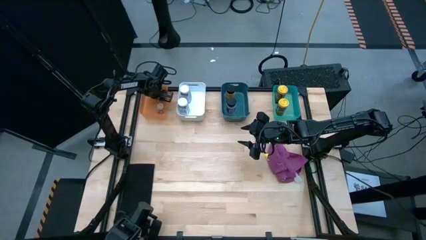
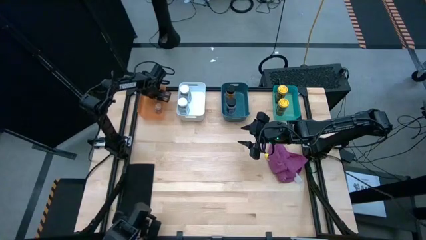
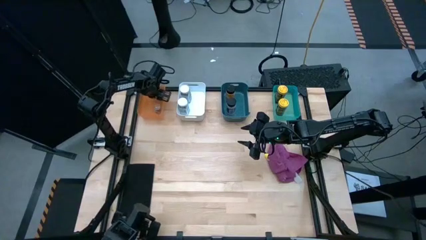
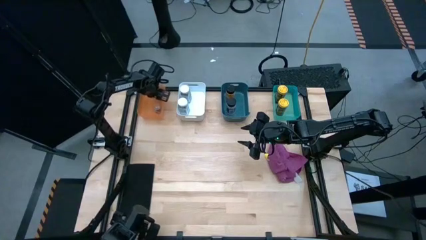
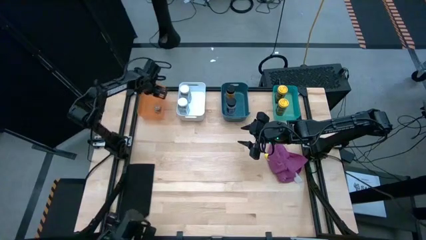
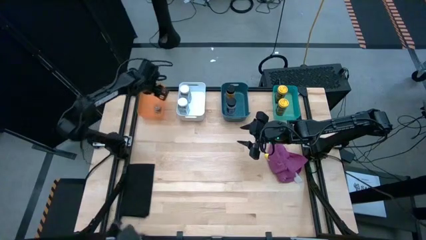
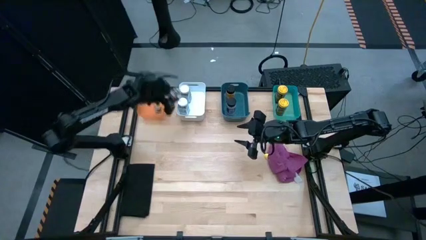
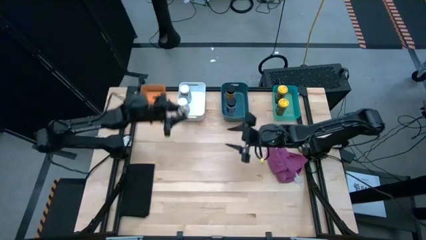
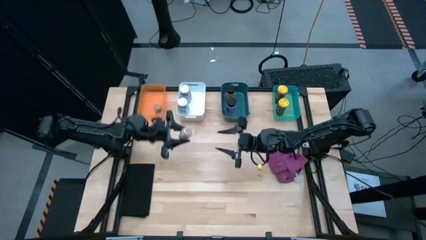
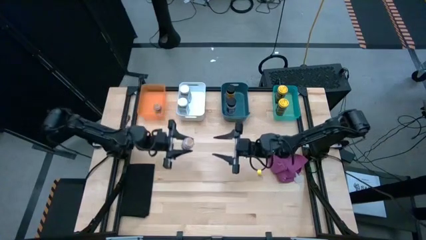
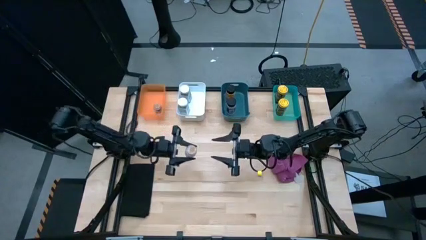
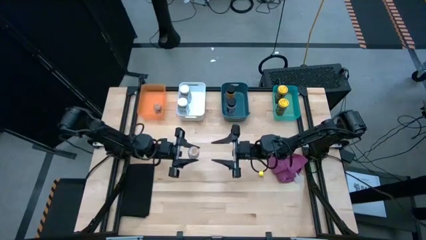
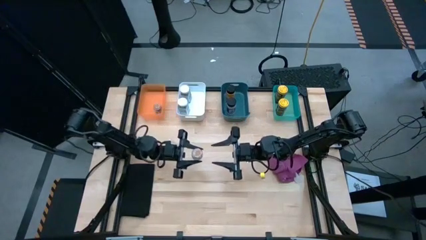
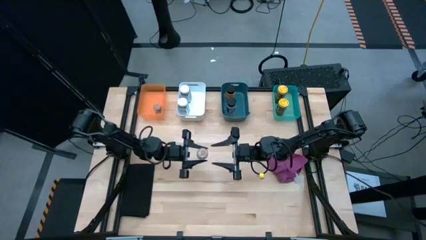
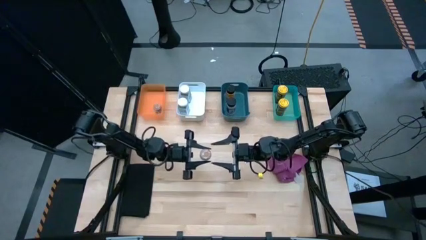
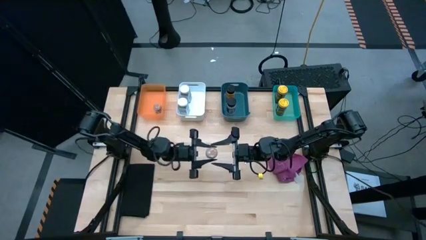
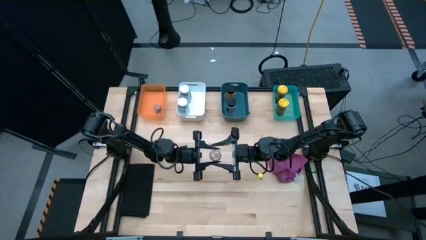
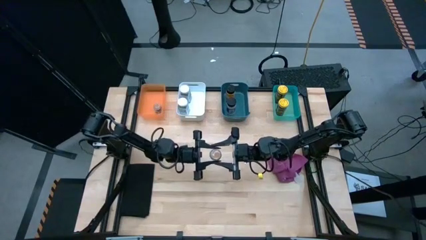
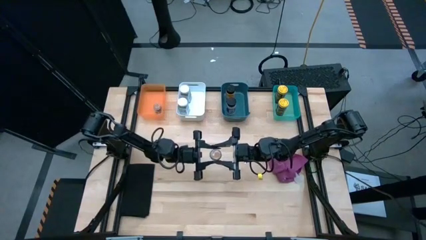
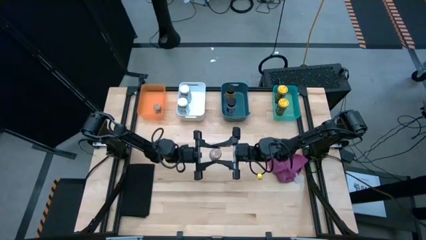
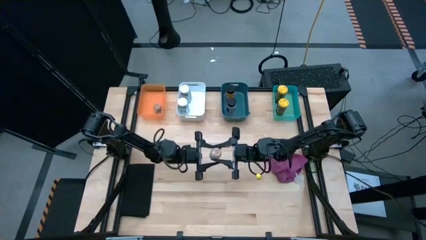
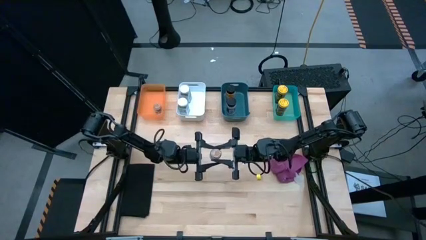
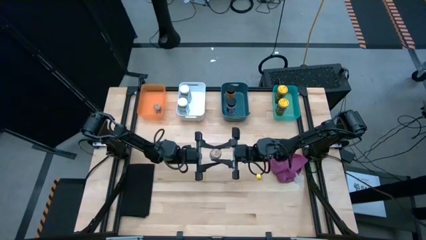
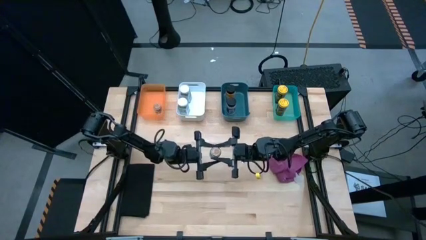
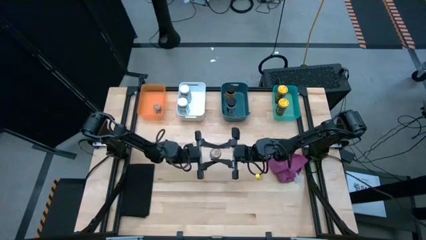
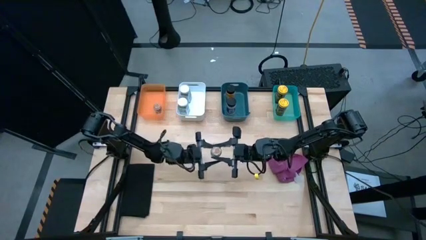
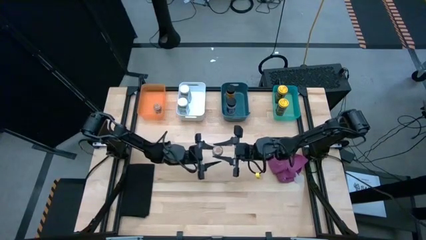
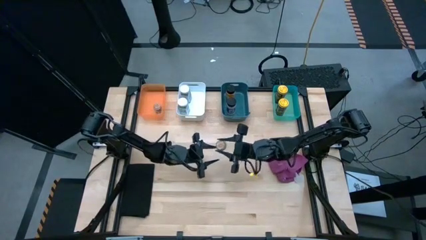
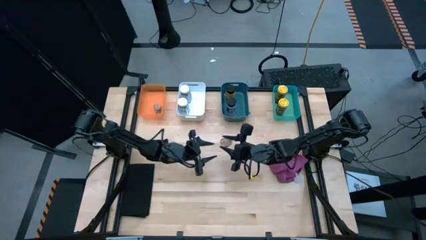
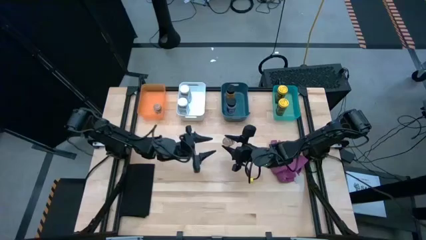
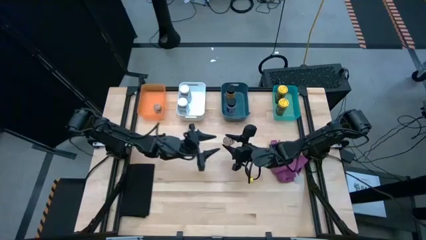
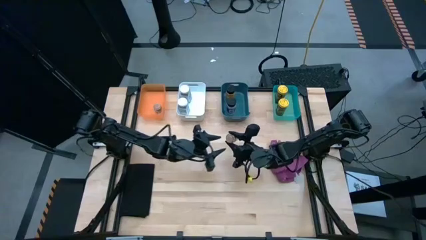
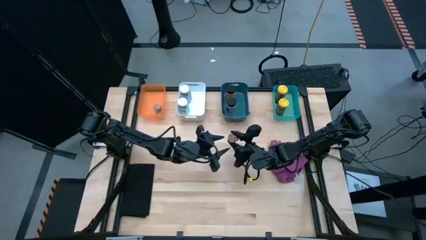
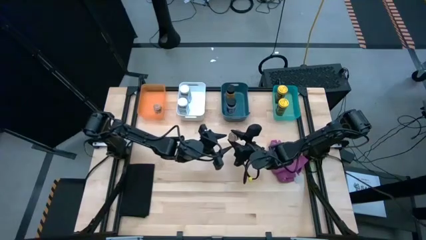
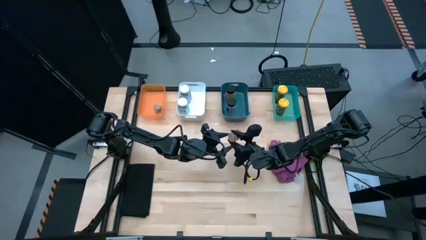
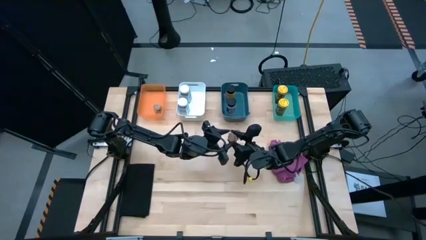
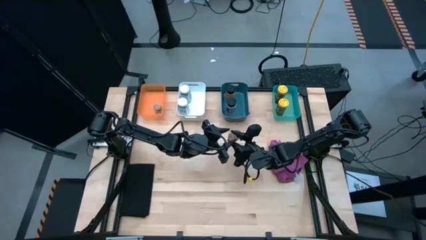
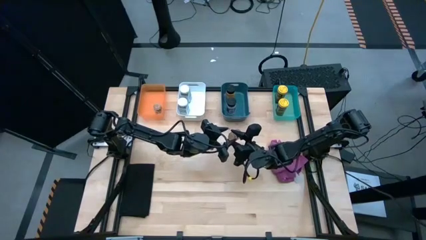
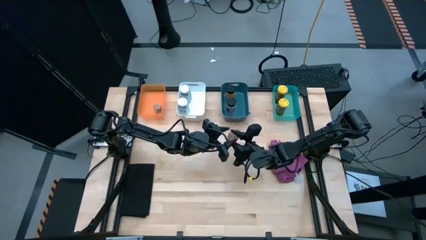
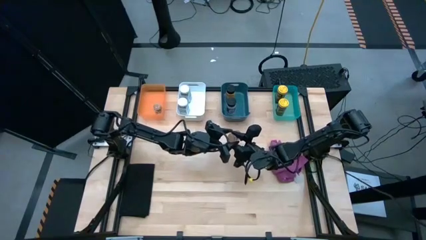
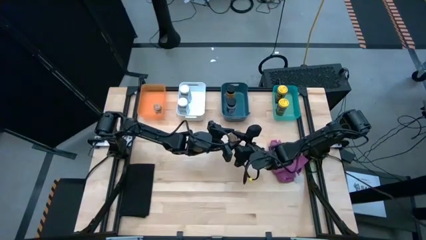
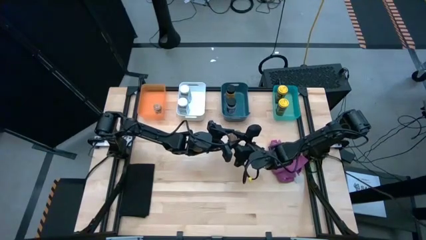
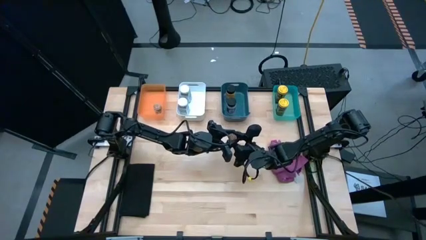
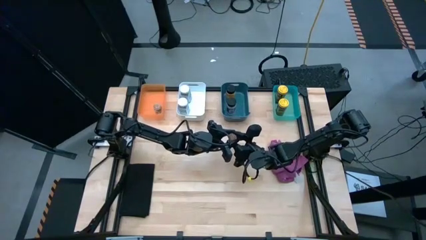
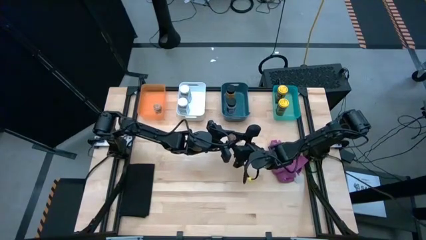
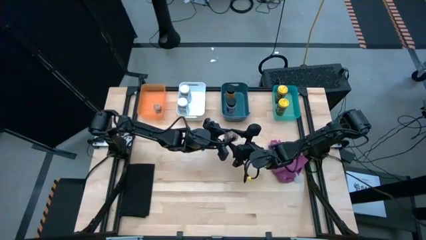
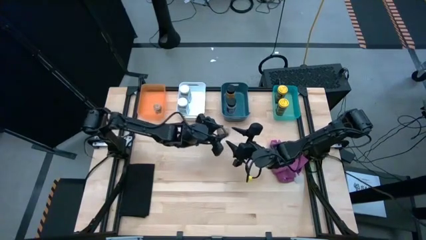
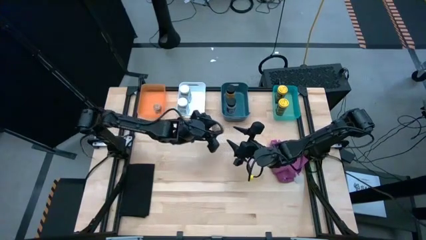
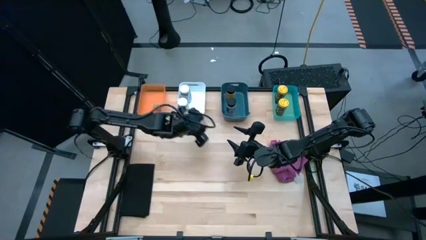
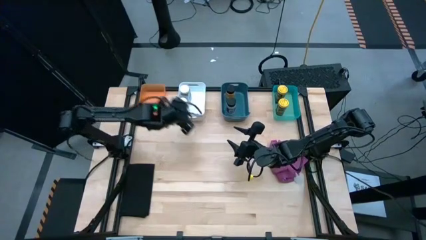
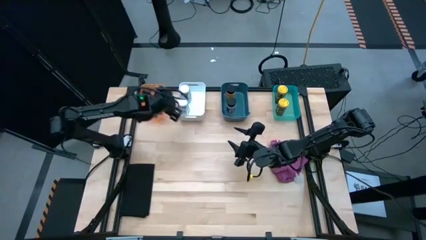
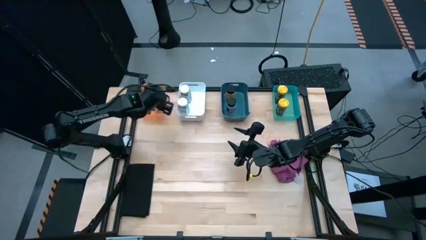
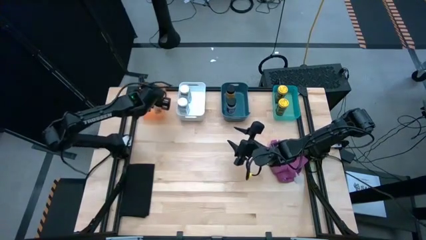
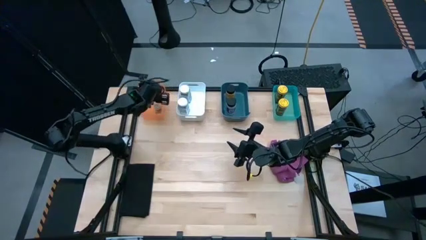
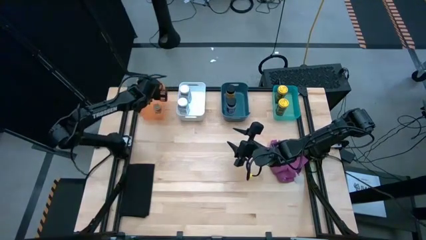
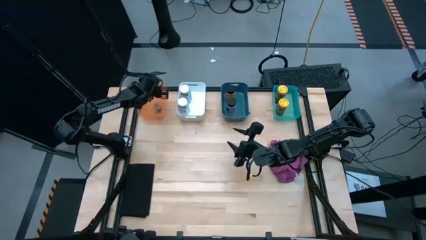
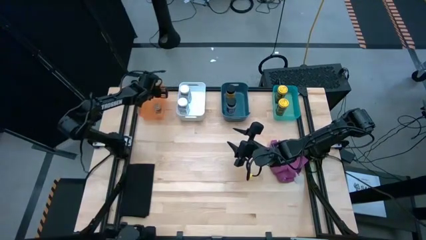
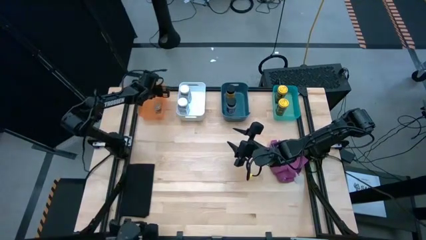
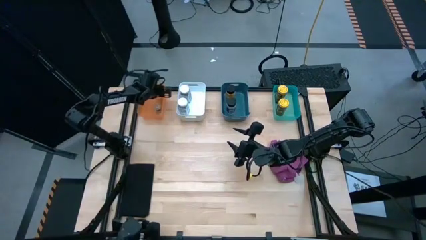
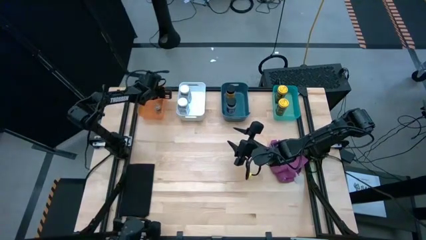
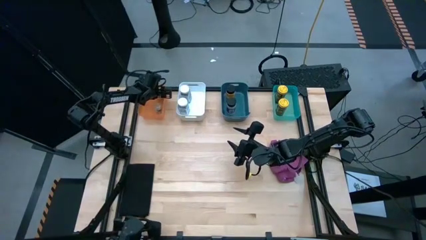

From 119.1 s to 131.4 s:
Task: Sort spices by type
Put the brown seasoning bottle into the orange bin

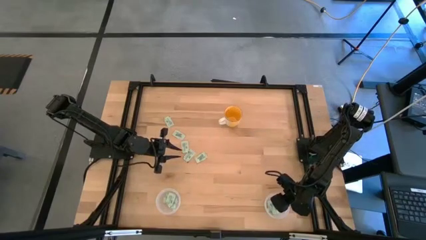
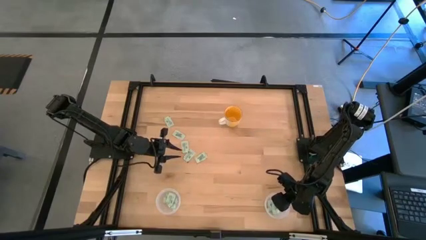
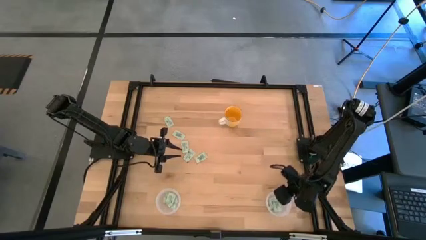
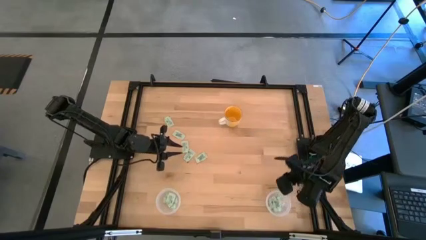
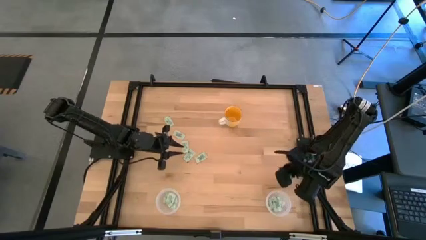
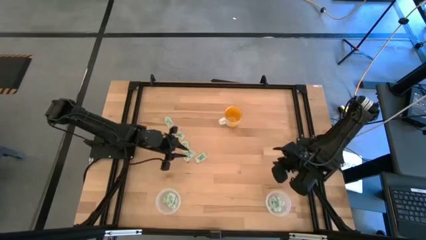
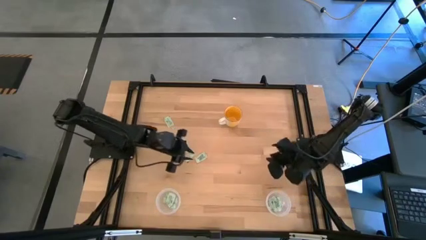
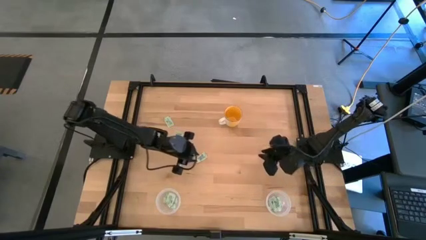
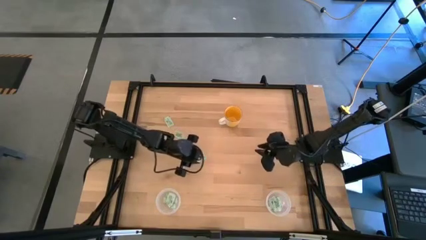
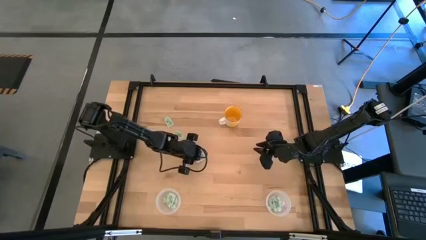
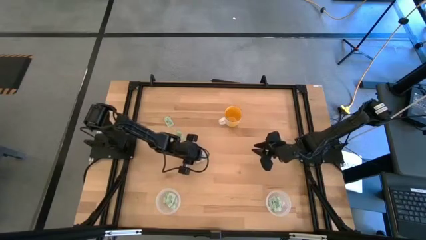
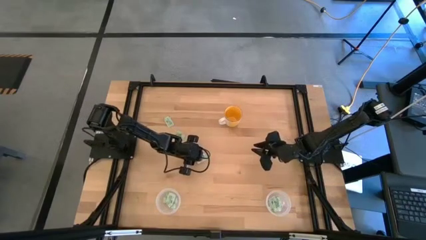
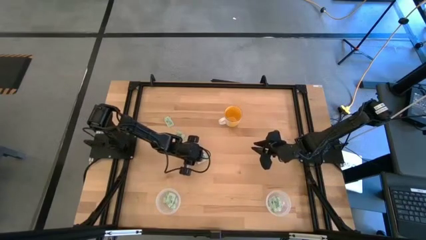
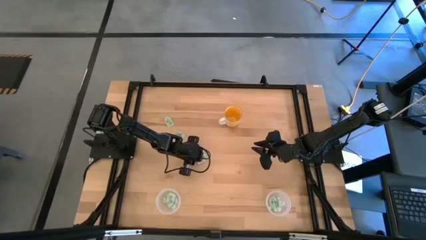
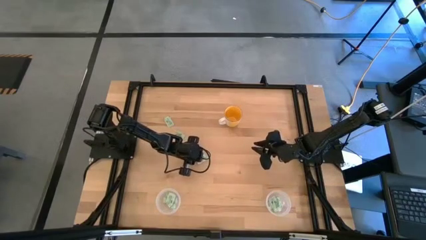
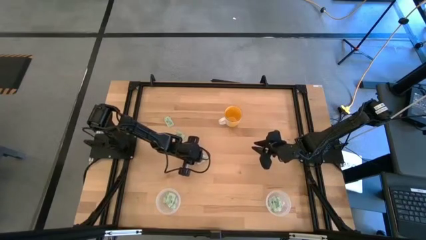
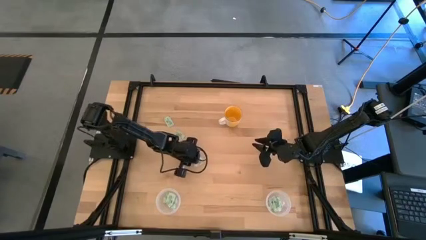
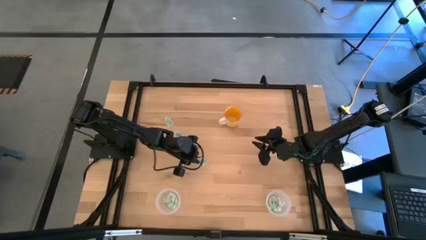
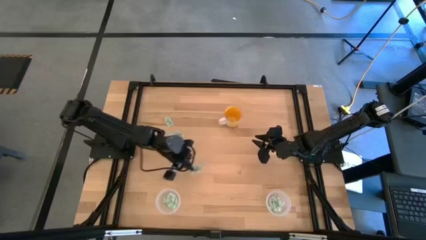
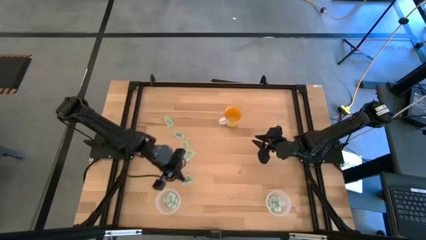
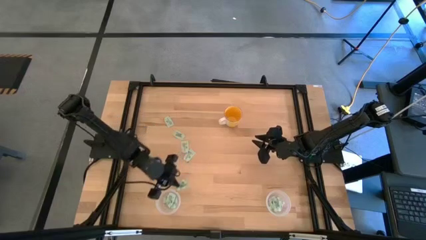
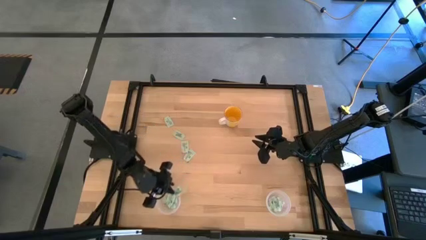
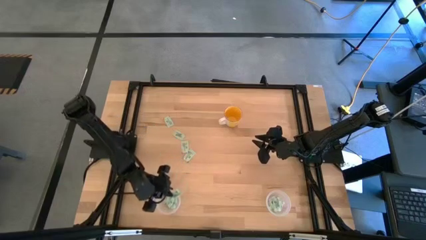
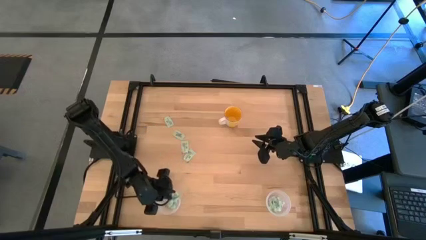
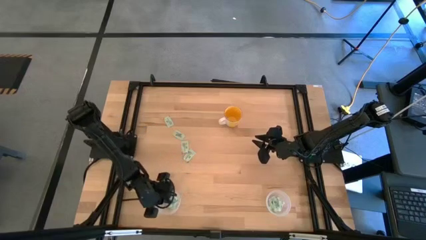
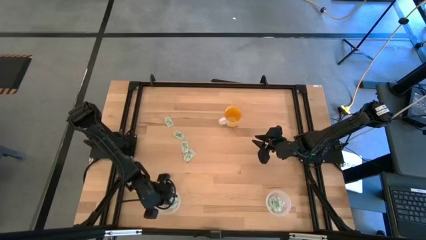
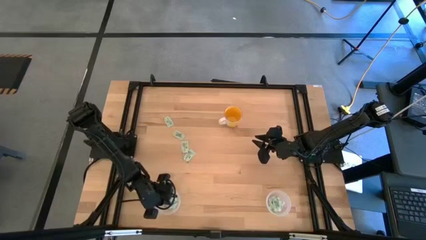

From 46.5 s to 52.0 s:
Task: Pick and place items into bin
Put the stevia packet into the left transparent bin
